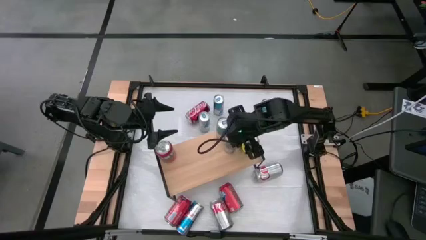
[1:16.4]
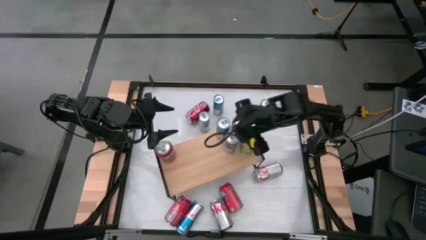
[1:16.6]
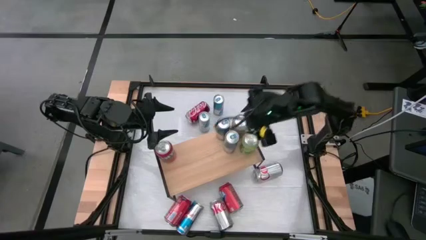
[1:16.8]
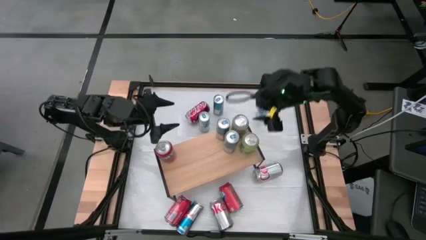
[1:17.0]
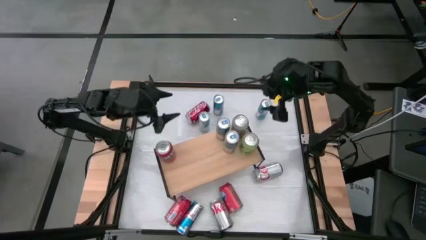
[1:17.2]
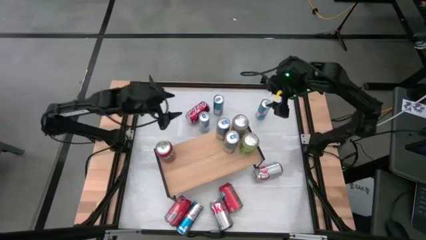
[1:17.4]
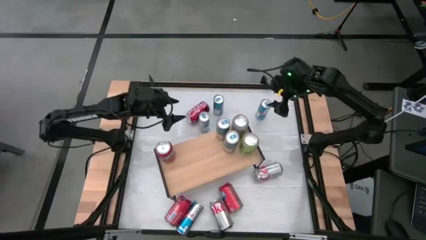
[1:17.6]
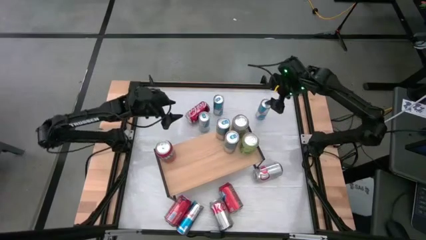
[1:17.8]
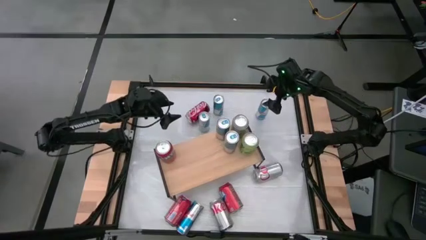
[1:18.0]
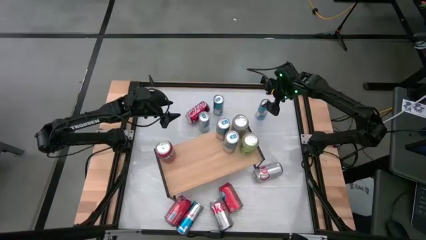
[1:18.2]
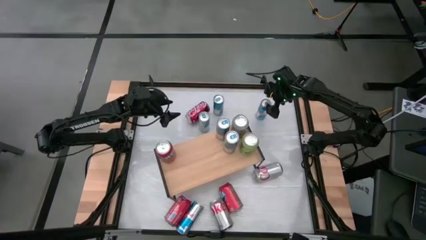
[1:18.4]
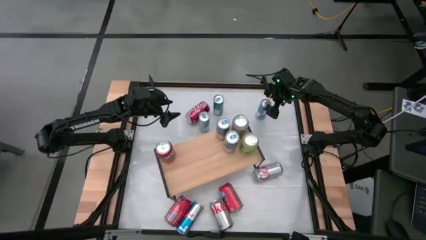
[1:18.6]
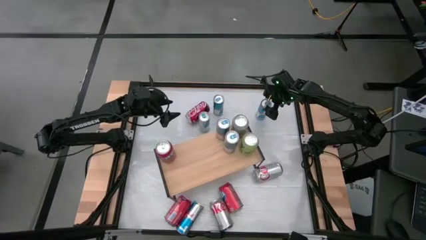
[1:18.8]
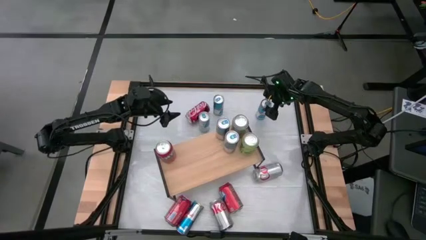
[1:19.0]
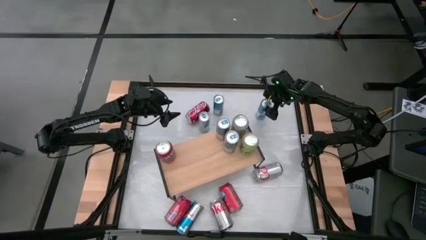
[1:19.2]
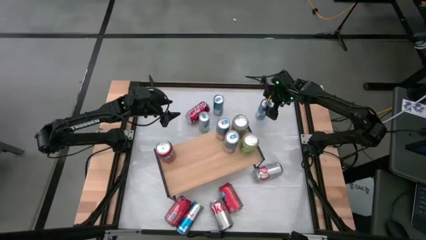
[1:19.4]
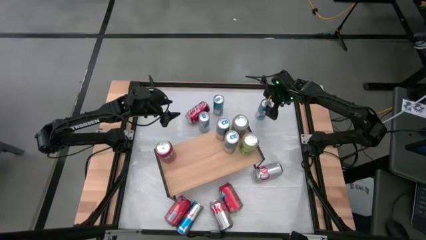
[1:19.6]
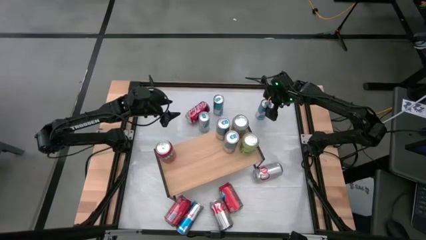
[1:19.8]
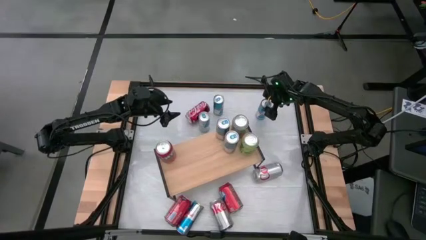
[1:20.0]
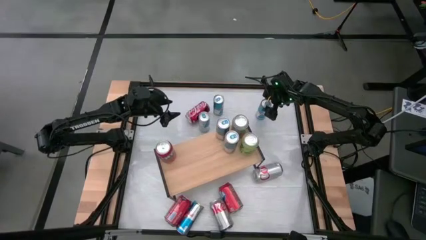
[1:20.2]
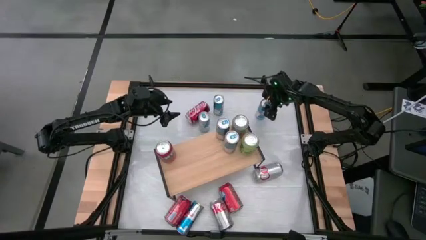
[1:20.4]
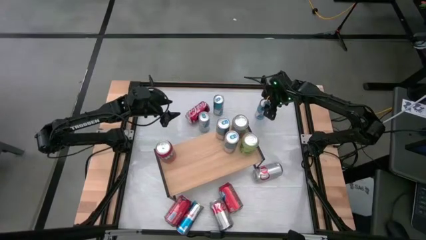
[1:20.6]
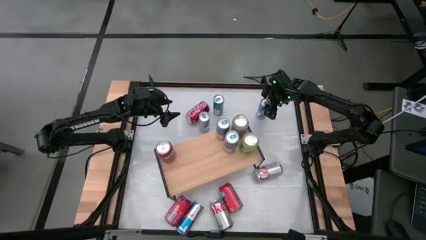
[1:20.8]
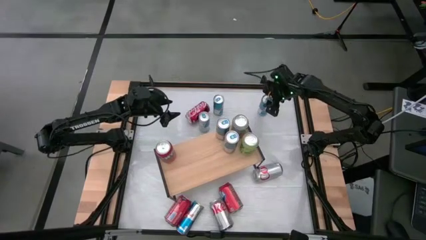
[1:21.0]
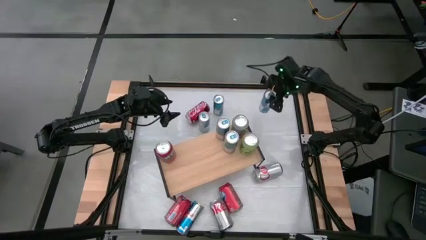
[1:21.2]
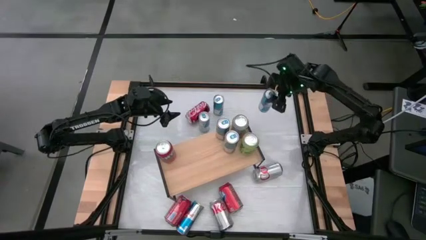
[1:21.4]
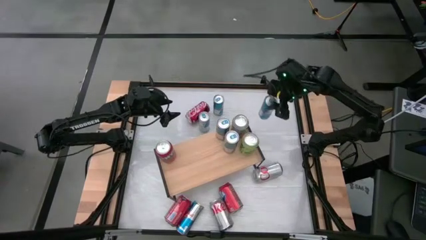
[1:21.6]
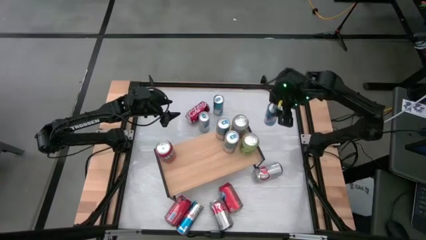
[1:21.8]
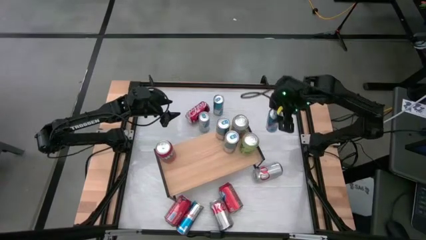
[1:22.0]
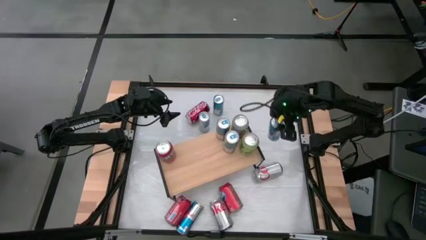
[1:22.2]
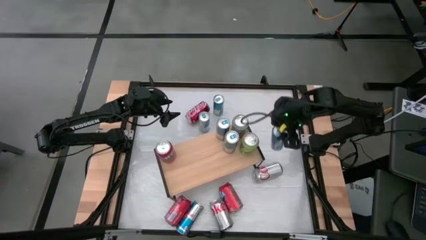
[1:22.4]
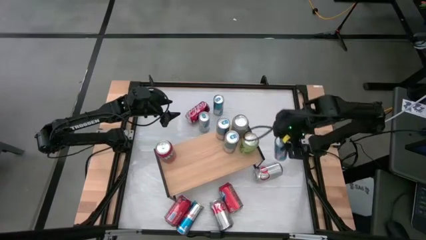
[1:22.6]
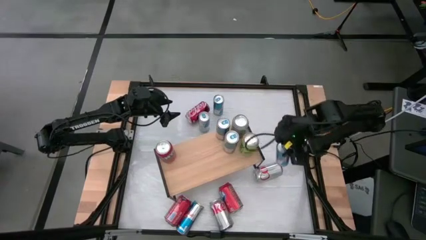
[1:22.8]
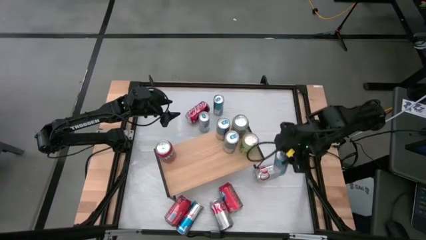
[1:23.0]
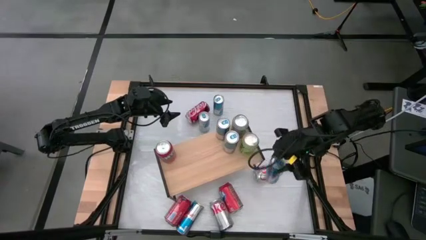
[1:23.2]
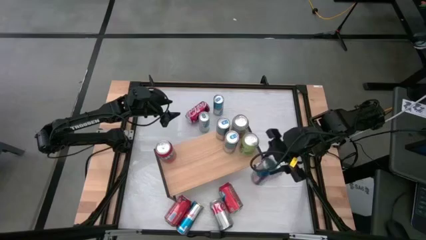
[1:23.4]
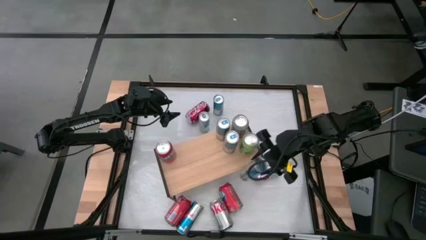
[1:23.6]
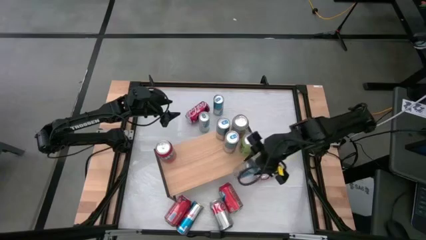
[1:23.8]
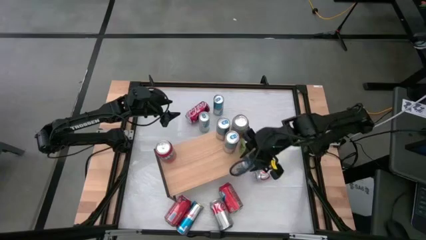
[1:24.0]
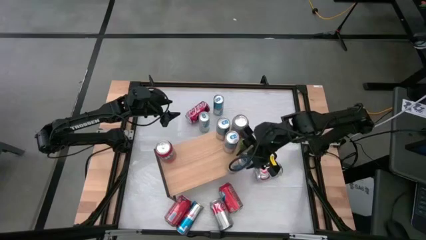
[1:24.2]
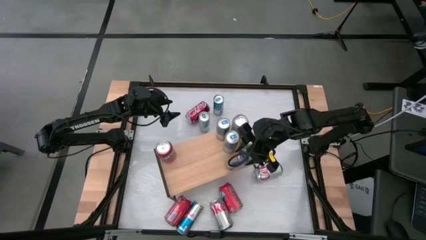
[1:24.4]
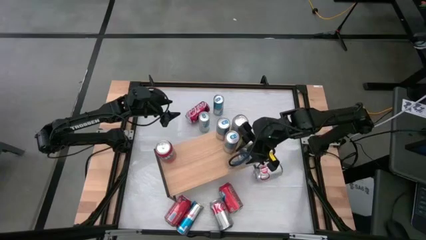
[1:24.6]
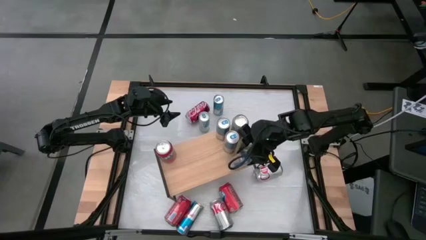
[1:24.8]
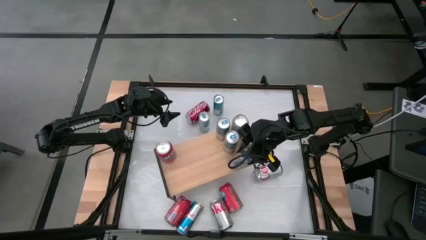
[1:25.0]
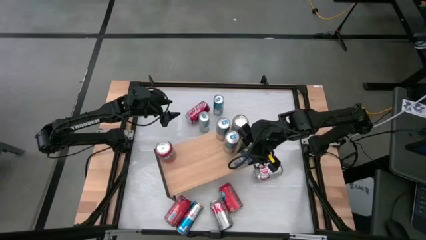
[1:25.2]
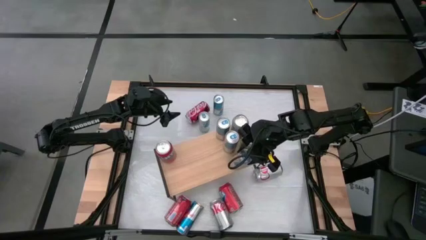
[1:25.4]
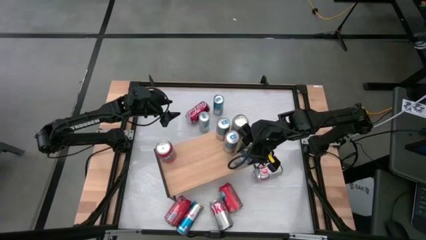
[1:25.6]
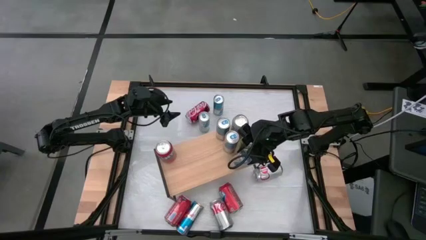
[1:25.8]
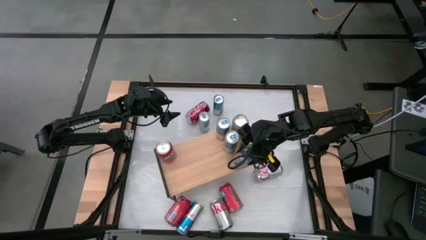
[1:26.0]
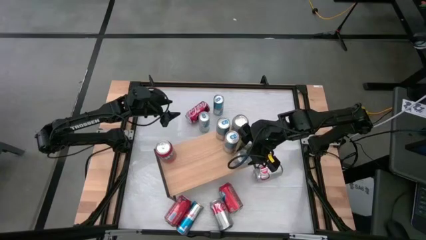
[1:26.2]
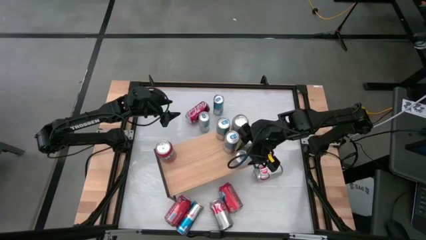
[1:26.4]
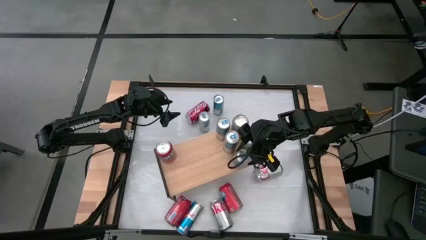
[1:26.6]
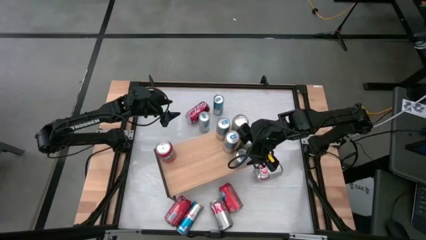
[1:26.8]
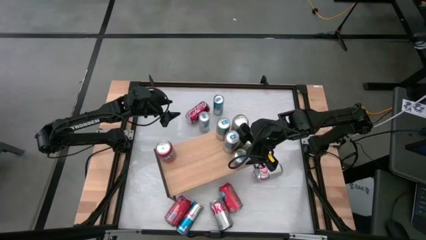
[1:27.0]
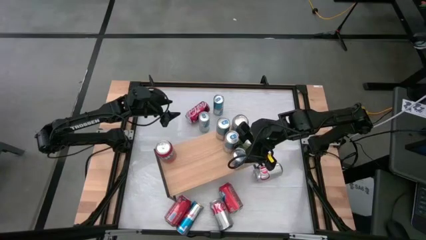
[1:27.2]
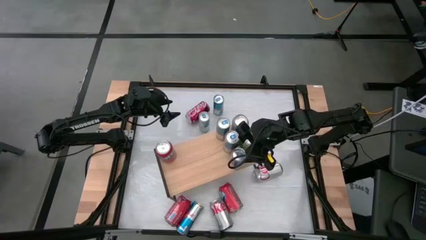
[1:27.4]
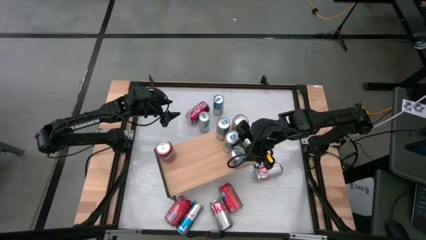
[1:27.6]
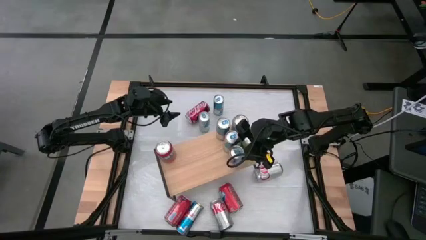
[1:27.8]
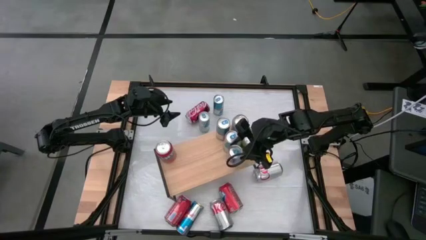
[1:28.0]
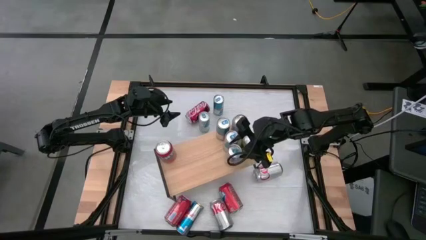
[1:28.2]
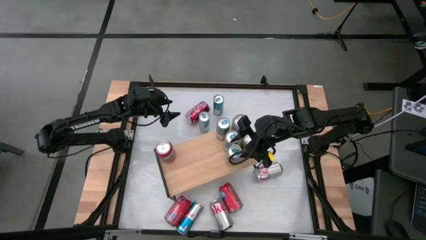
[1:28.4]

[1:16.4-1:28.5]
Task: Place canned beverage on shelf
Put the blue soda can on the shelf aligned with the other blue soda cans

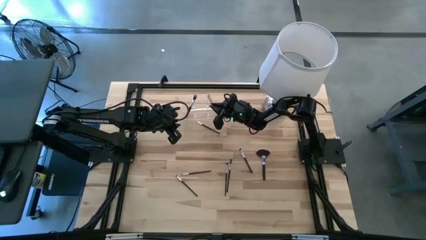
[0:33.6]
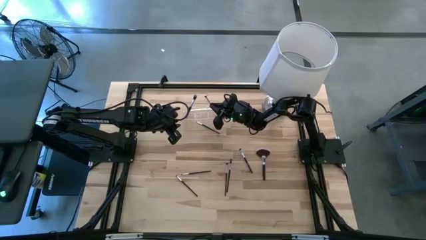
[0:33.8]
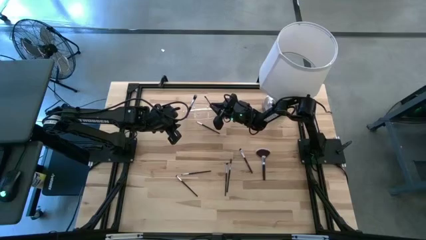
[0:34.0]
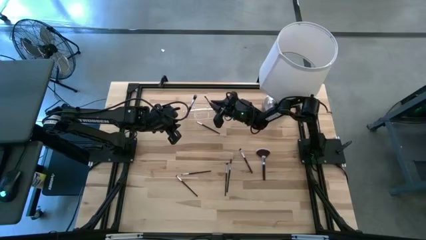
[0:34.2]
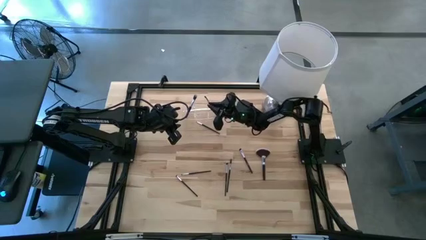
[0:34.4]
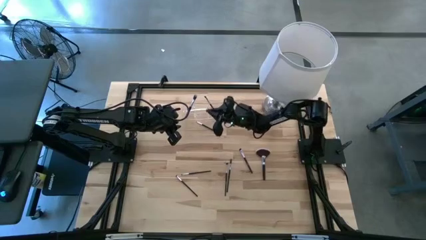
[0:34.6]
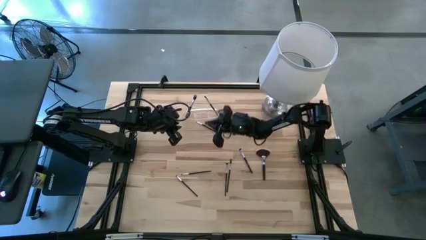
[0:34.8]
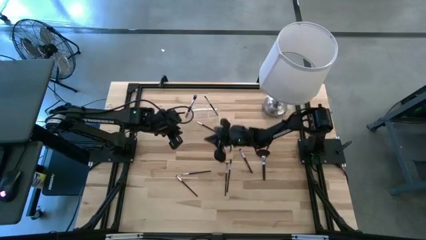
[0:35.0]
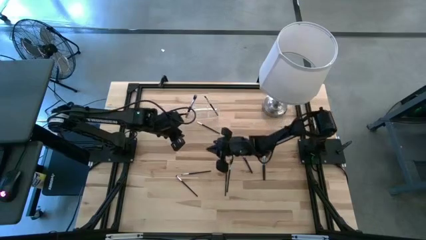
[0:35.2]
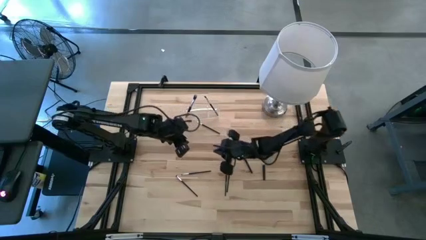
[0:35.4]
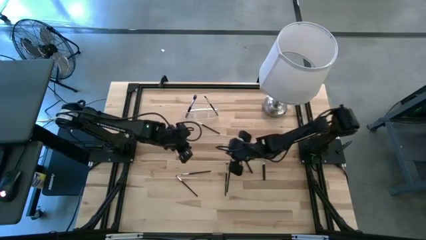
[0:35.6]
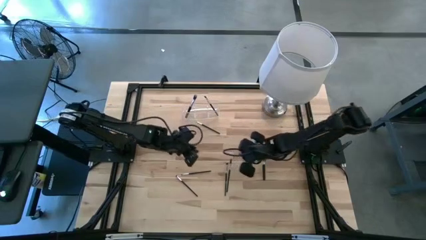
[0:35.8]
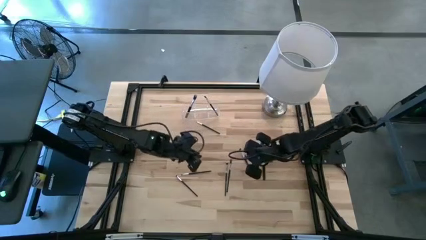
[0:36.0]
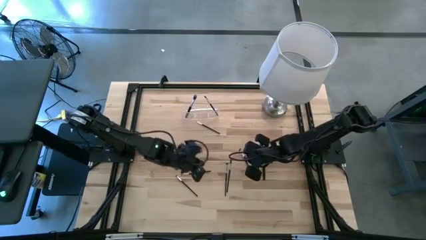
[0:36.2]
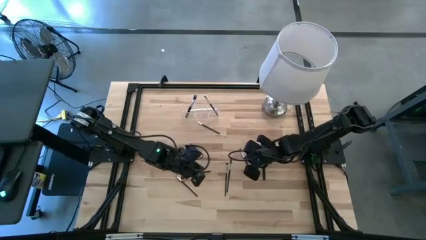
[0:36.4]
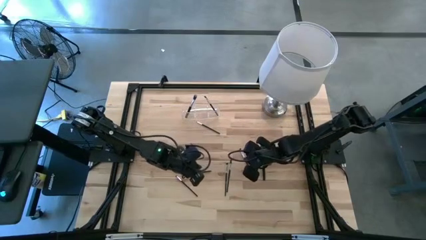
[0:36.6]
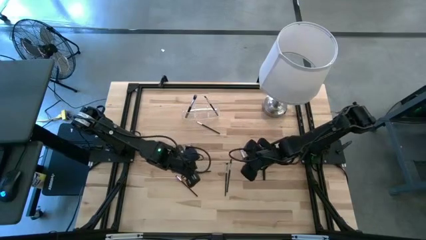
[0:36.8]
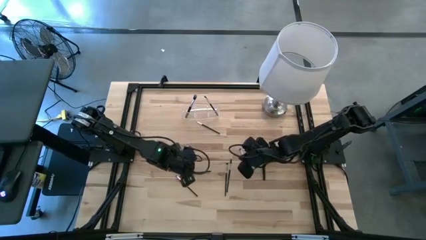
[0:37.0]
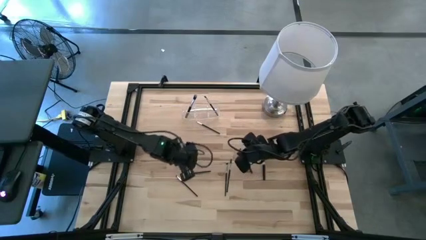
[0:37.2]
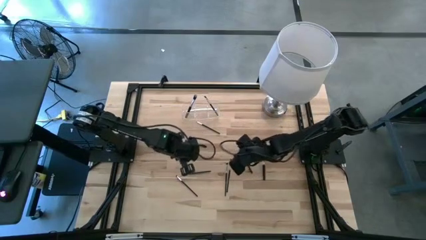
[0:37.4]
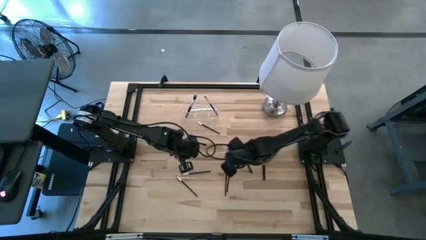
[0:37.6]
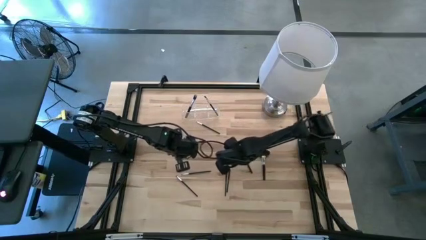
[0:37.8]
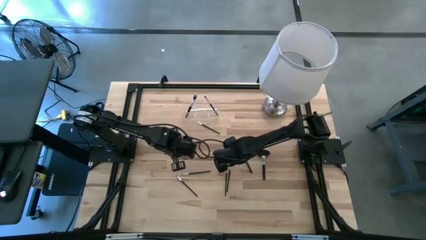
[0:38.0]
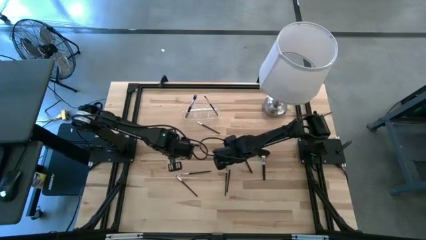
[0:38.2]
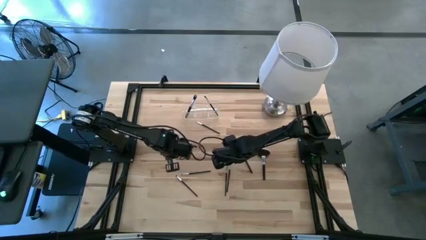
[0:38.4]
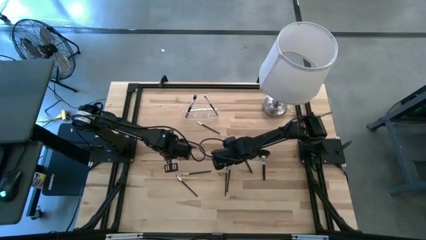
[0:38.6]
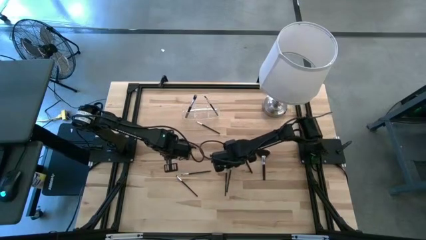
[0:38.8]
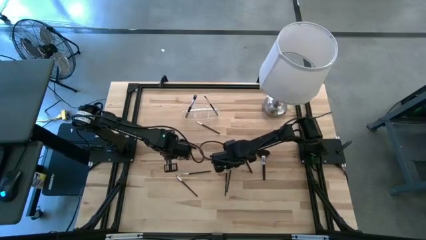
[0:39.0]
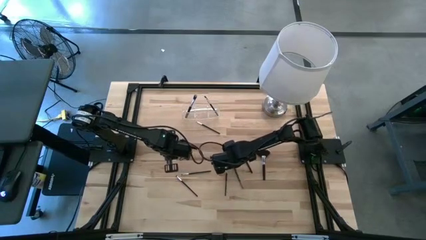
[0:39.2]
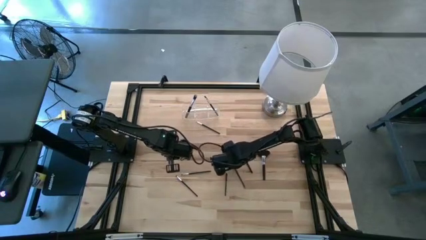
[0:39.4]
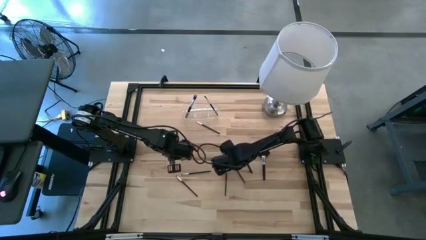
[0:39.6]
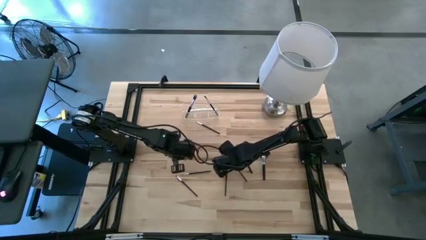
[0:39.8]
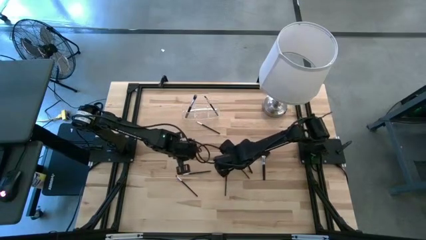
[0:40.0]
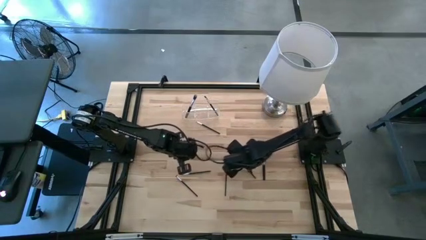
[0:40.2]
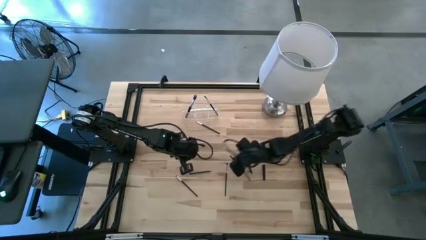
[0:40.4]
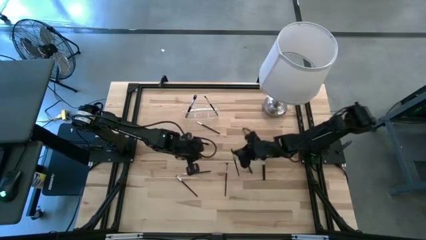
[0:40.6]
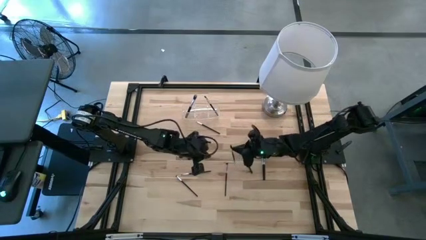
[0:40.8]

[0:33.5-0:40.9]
Task: Put items in baskets/containers
Put the lash brush into the transparent organizer
